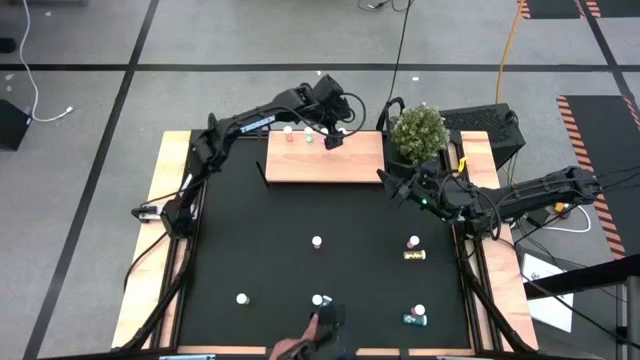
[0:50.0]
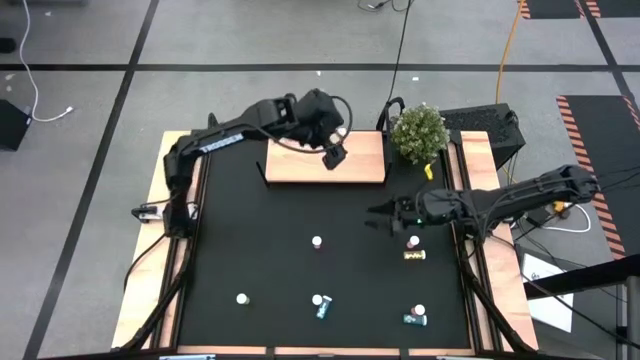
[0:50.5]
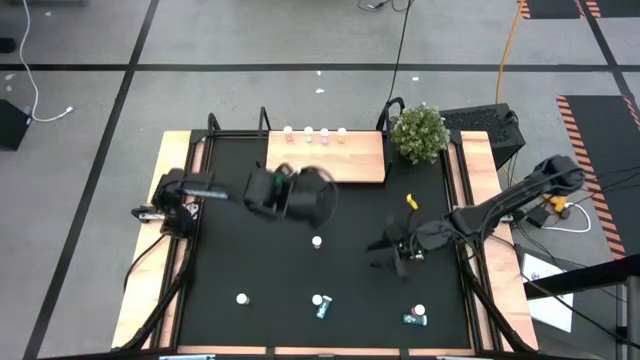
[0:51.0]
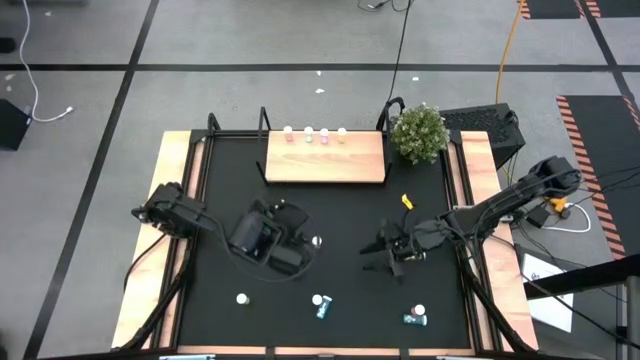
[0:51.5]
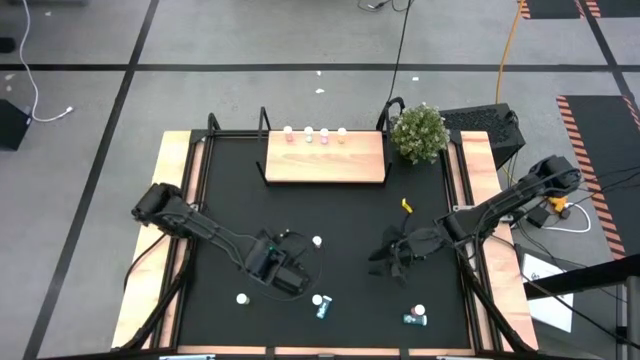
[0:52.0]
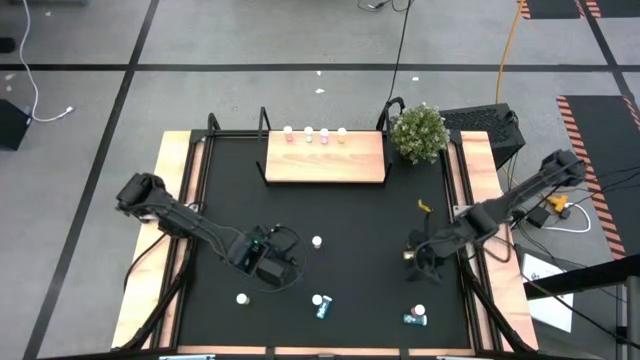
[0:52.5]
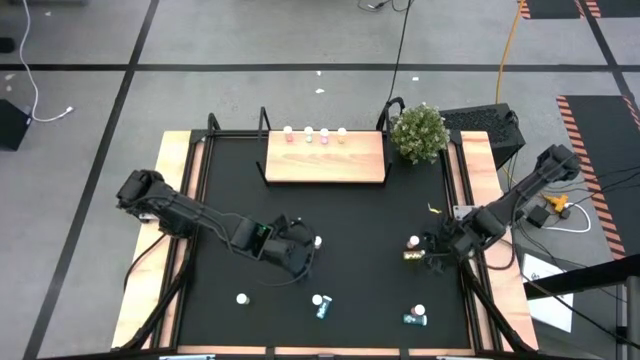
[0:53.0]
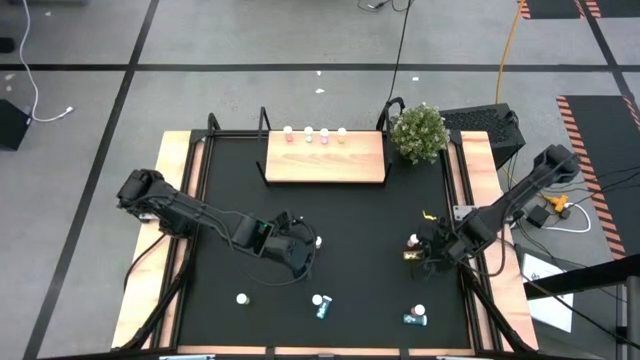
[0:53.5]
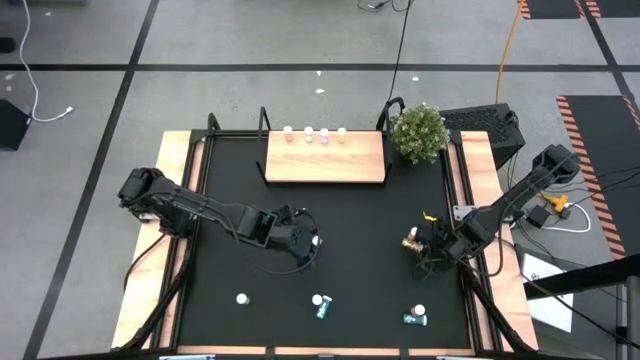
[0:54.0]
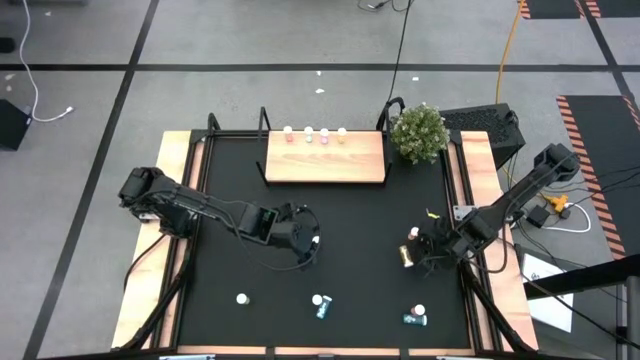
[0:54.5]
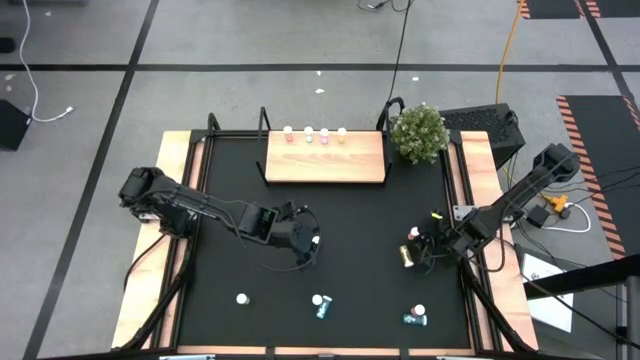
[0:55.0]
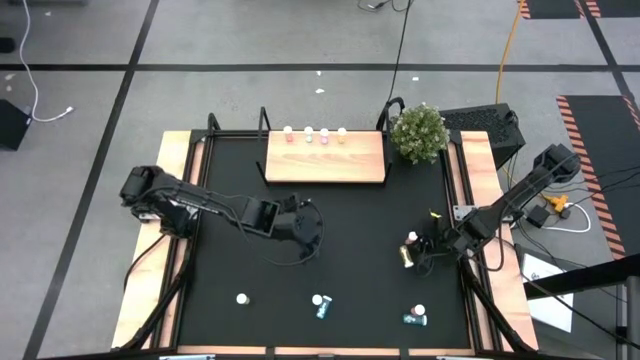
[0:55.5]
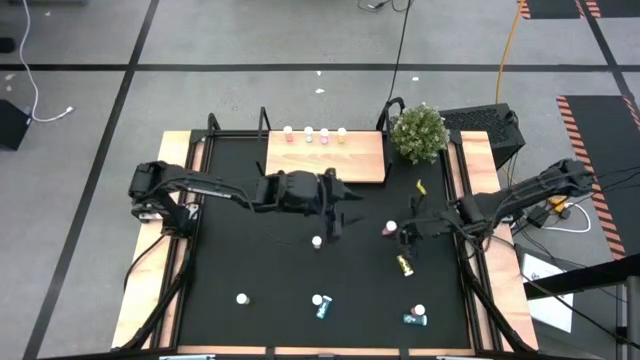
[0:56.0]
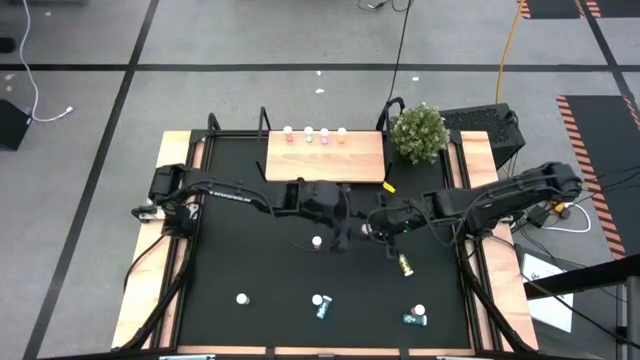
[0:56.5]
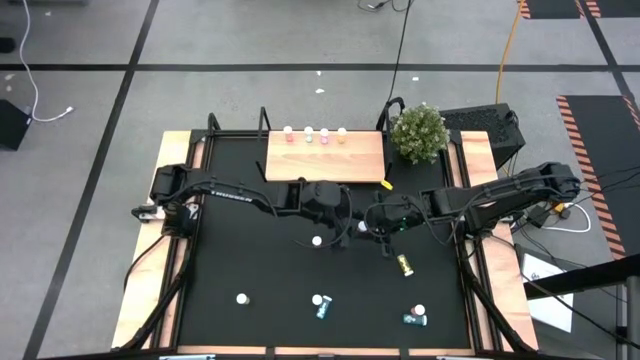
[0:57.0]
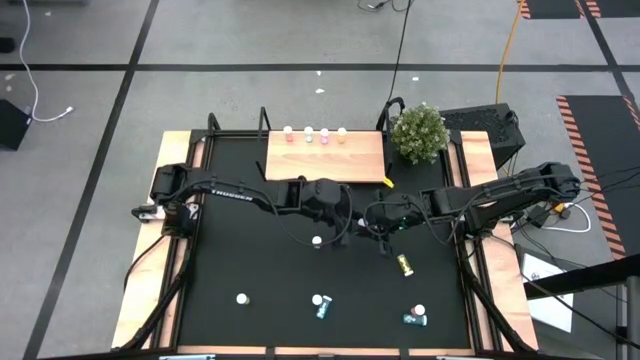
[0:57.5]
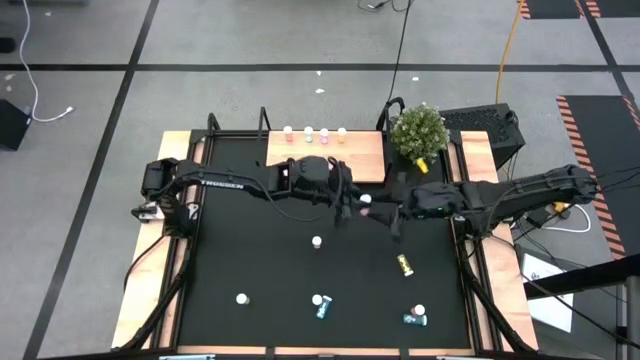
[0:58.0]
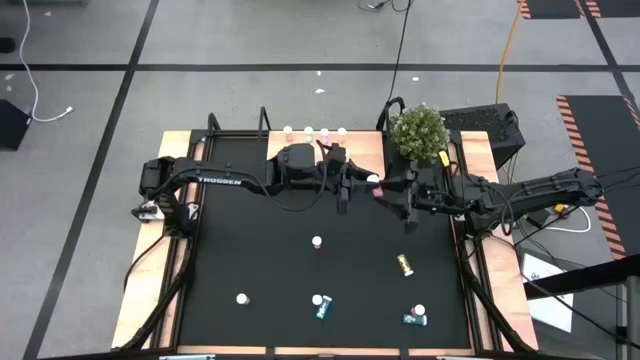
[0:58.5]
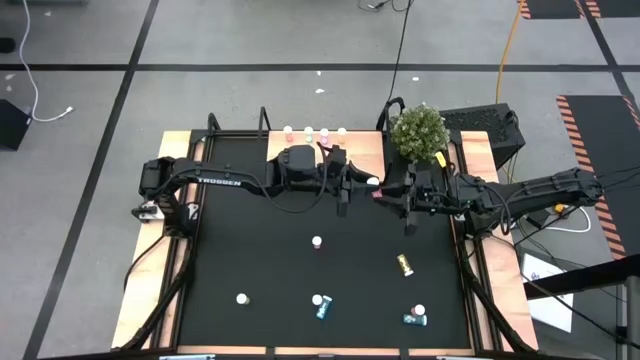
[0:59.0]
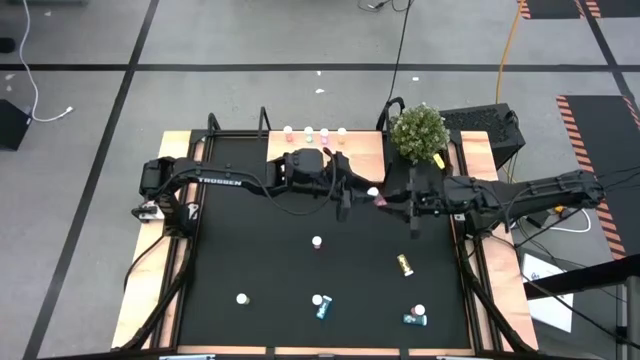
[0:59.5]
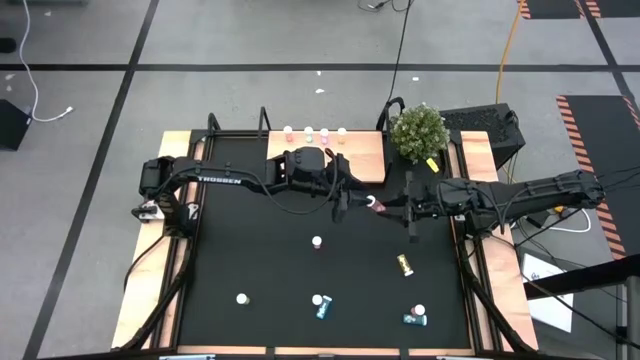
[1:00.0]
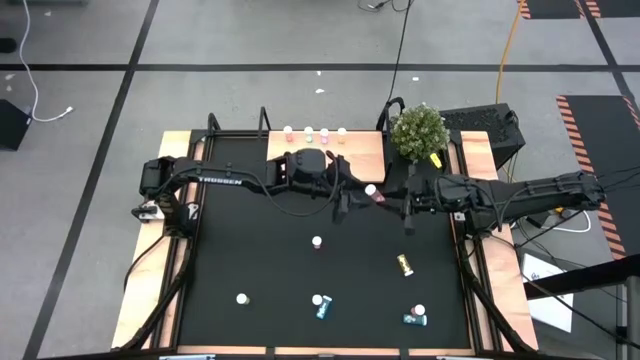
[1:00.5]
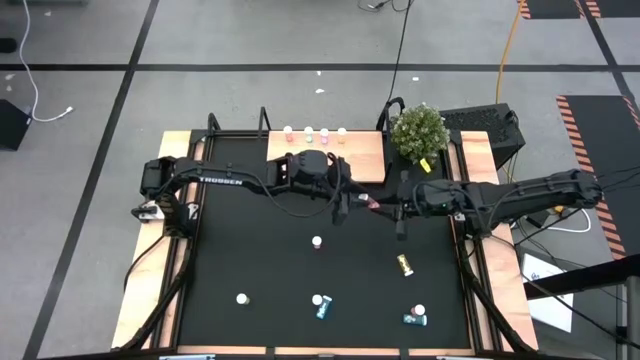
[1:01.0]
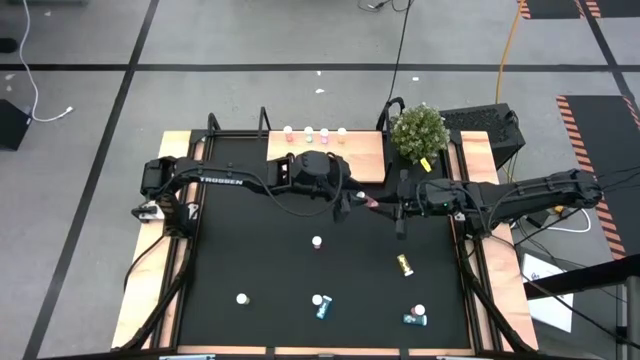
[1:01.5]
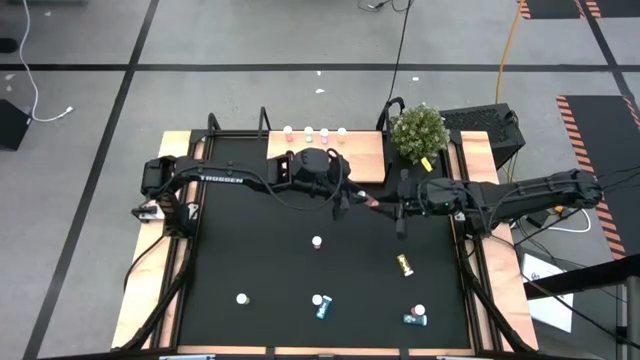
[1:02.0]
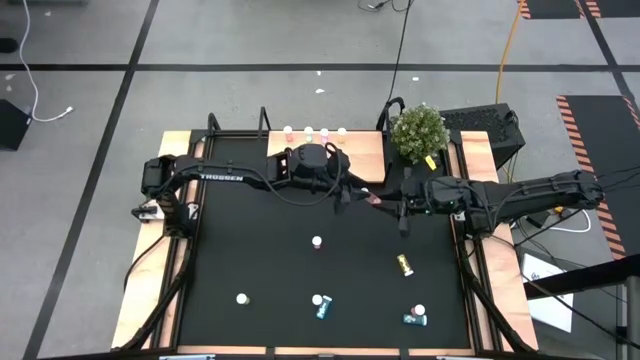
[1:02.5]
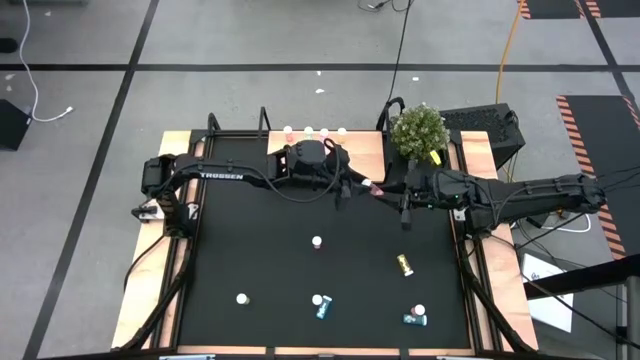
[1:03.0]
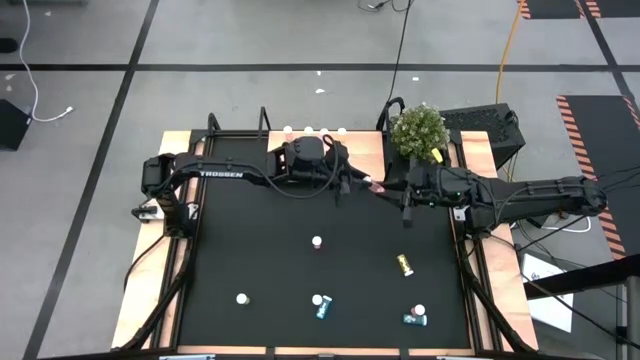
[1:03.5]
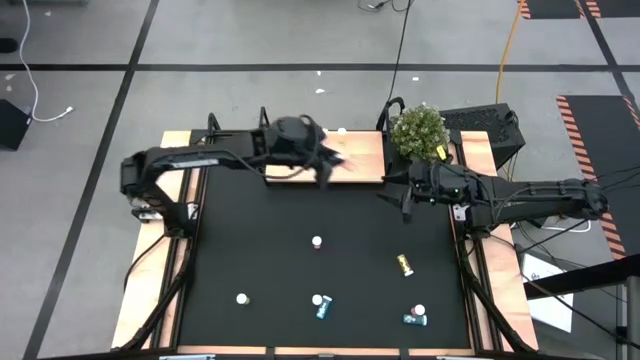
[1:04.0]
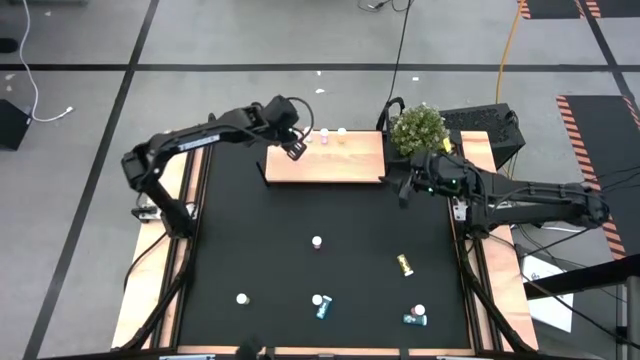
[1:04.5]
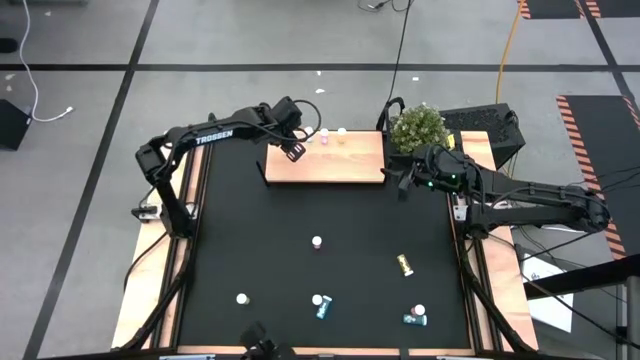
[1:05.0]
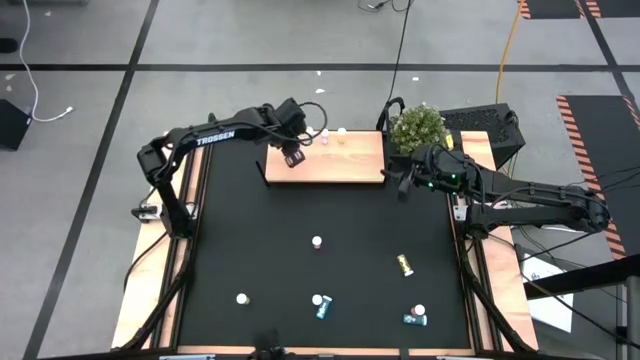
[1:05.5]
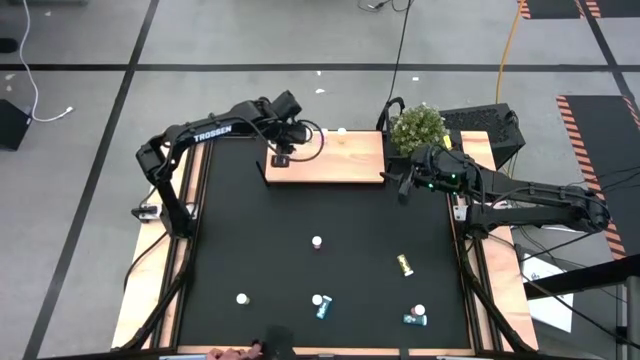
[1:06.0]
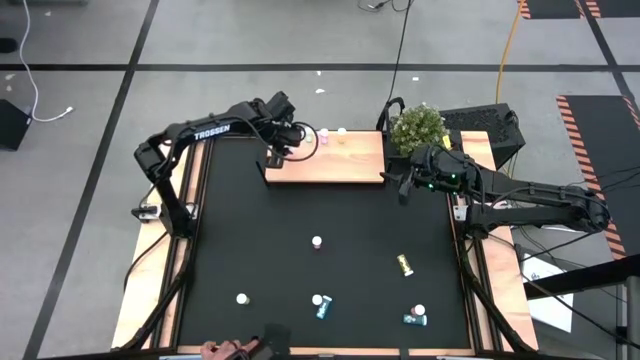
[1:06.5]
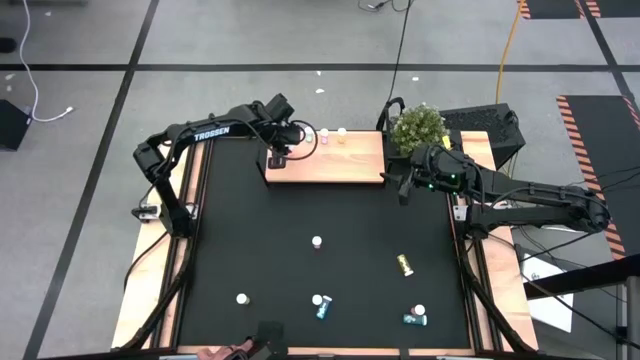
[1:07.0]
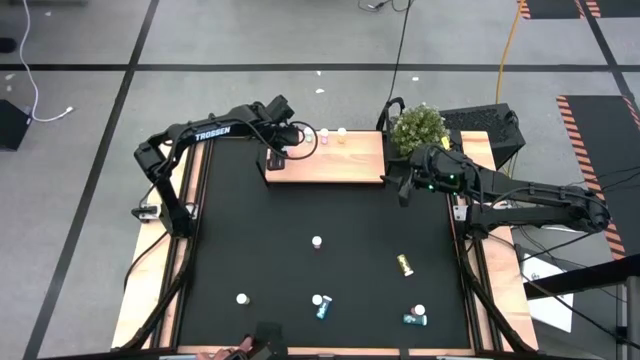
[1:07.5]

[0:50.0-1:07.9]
Task: Pick and place medicine bottles onto shelf by color
Put the top orange pill bottle on the shelf aligned with the other orange pill bottle

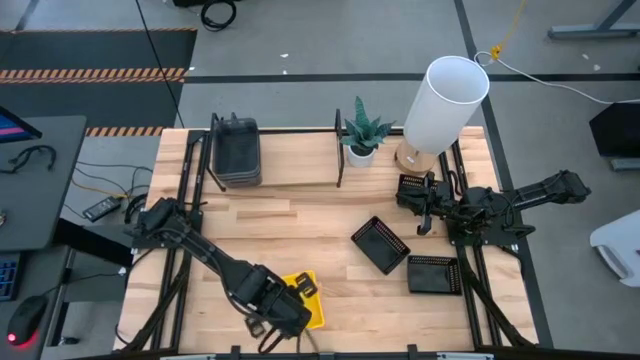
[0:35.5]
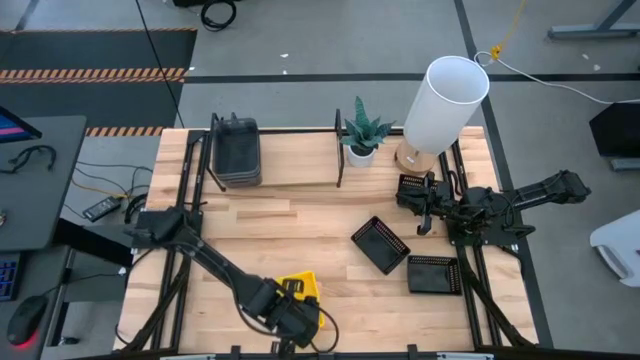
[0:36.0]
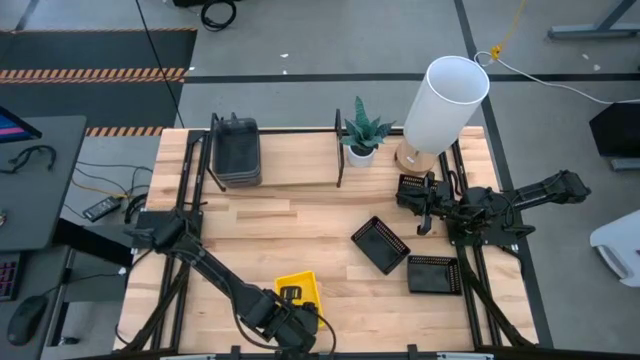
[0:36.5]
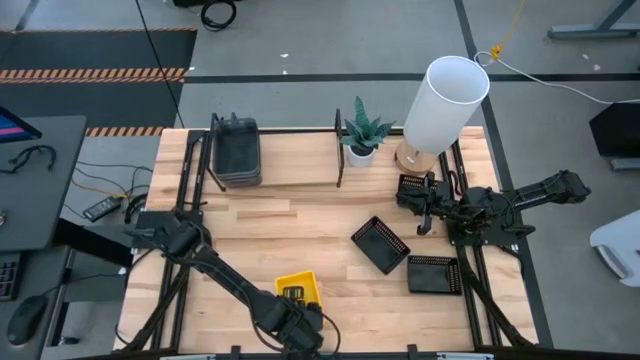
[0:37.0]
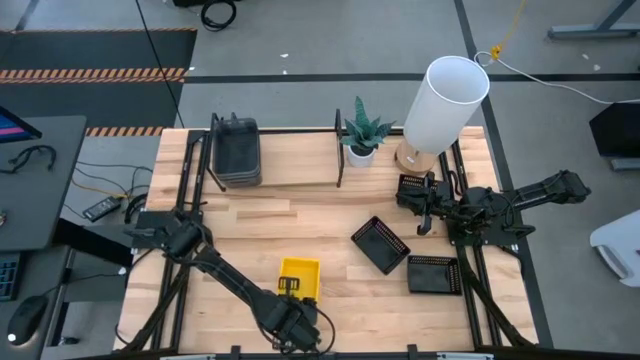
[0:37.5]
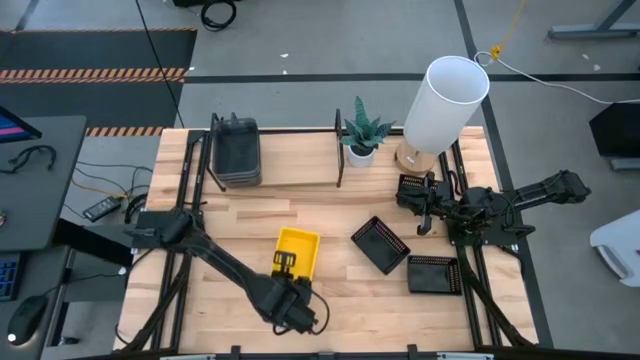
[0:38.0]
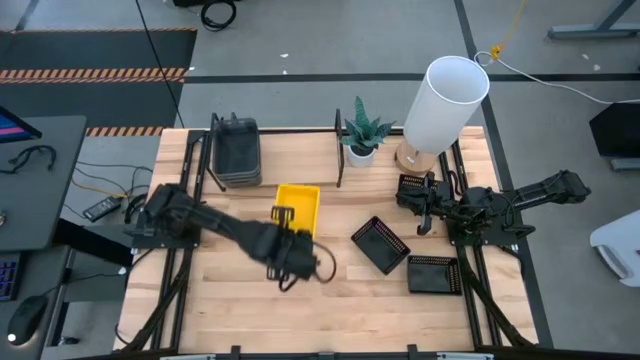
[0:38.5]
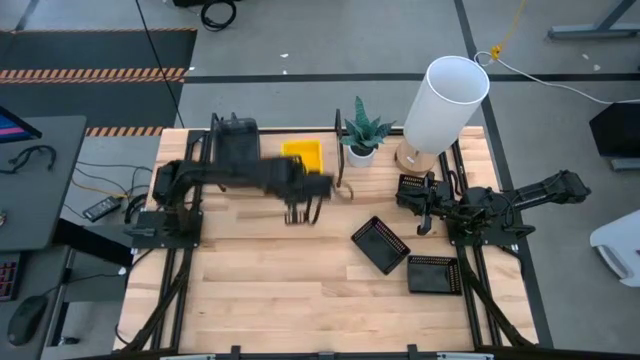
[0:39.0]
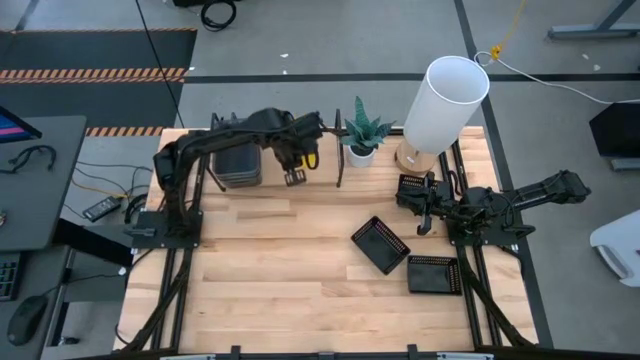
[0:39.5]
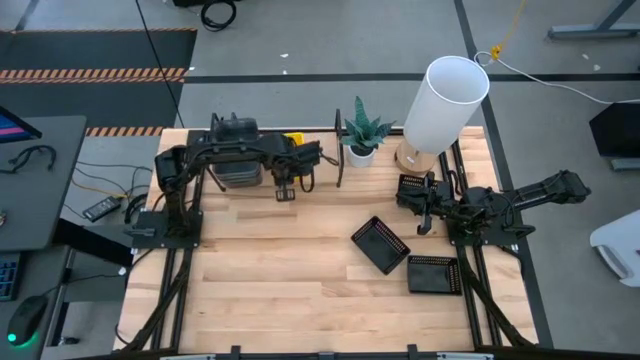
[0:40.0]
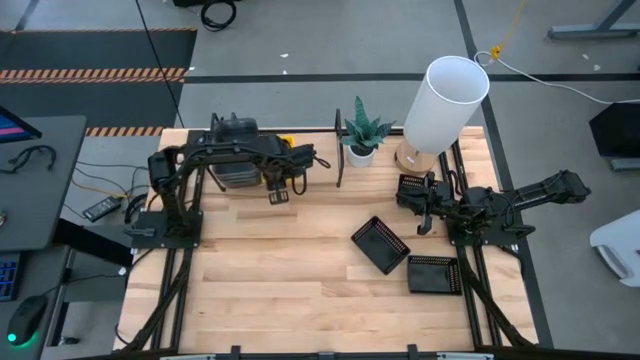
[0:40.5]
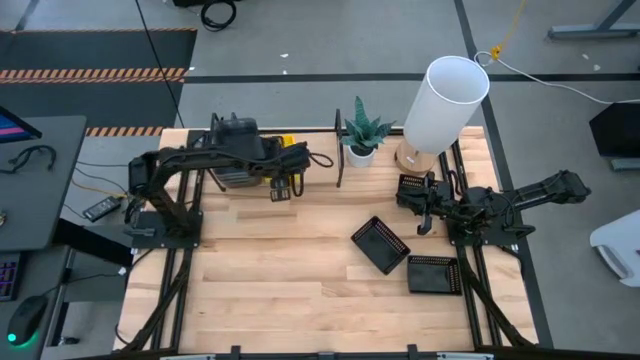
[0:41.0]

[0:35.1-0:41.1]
Task: Stack baskets on shelf by color
Put the stacked yellow bins on the shelf
